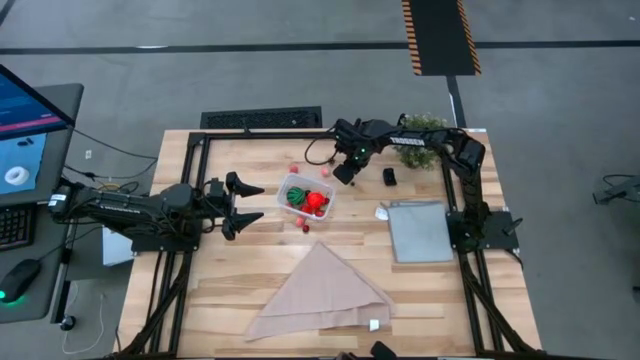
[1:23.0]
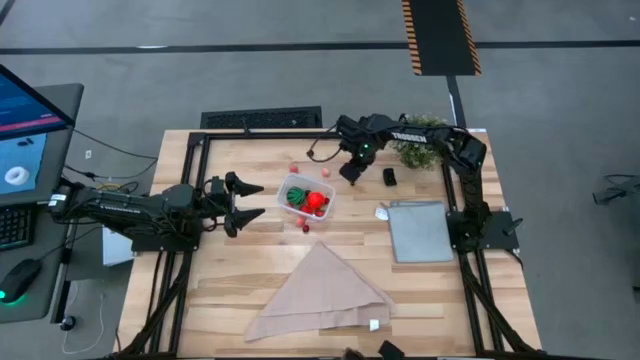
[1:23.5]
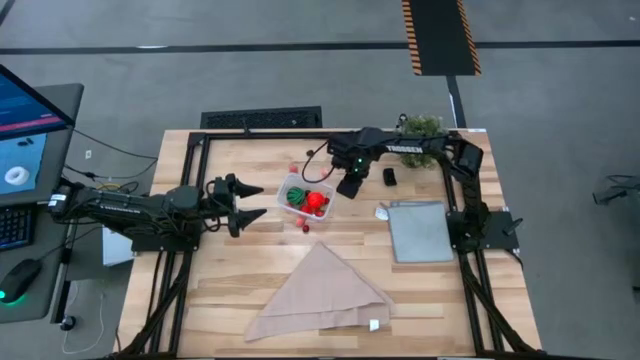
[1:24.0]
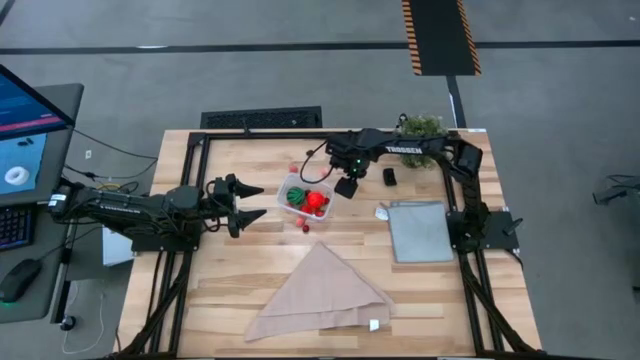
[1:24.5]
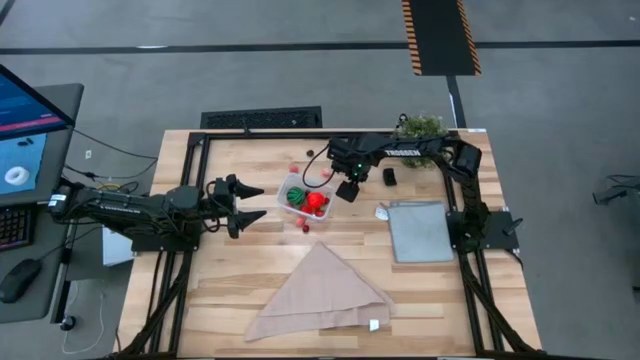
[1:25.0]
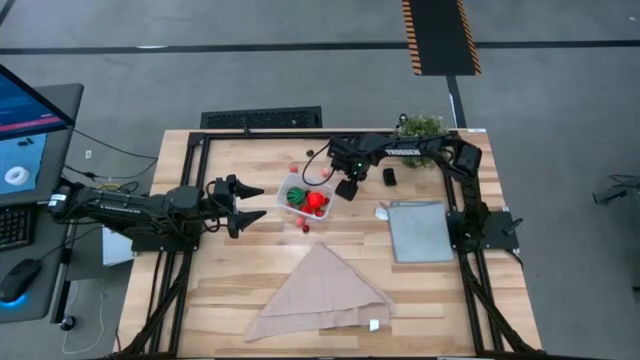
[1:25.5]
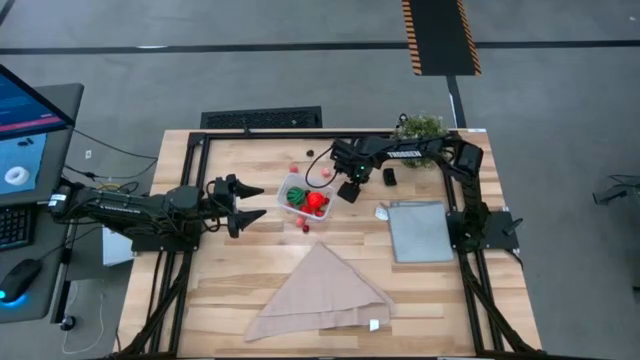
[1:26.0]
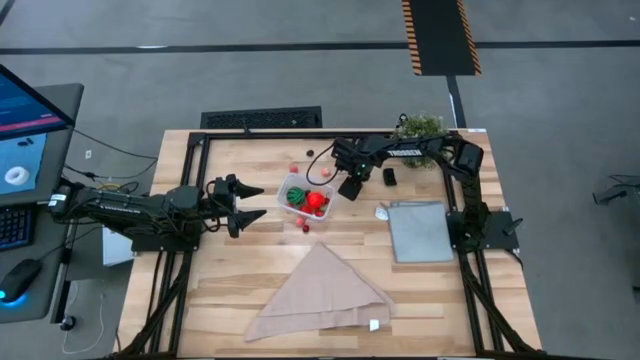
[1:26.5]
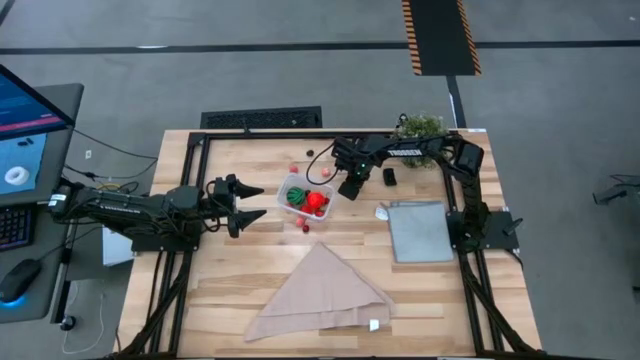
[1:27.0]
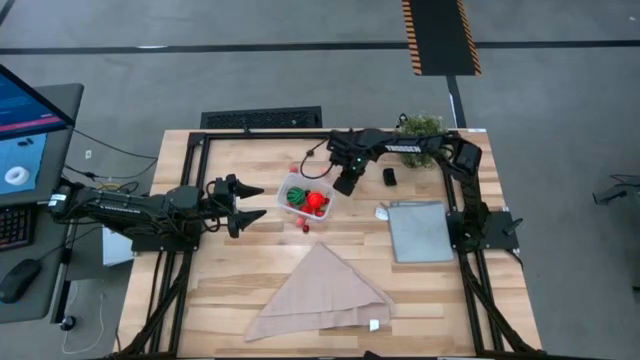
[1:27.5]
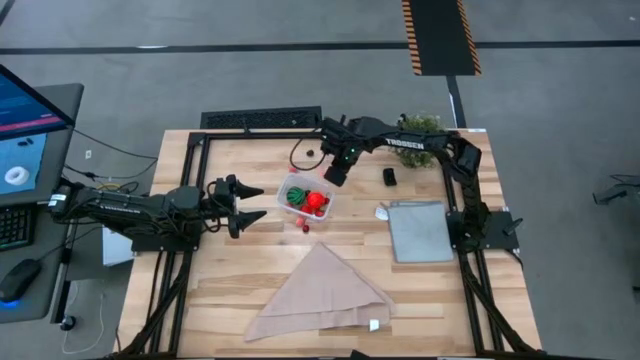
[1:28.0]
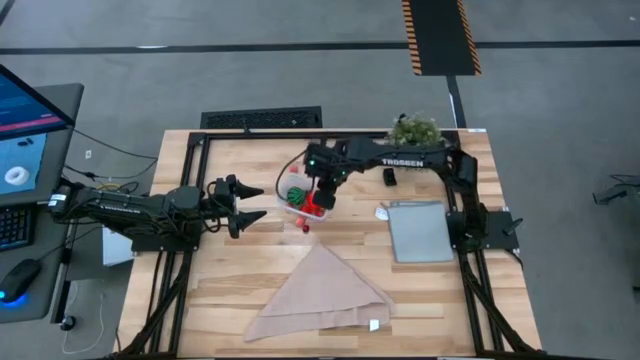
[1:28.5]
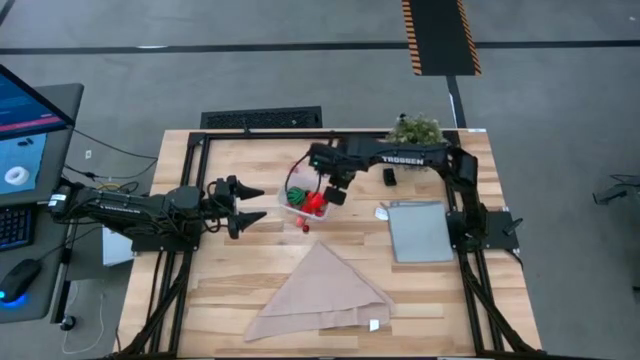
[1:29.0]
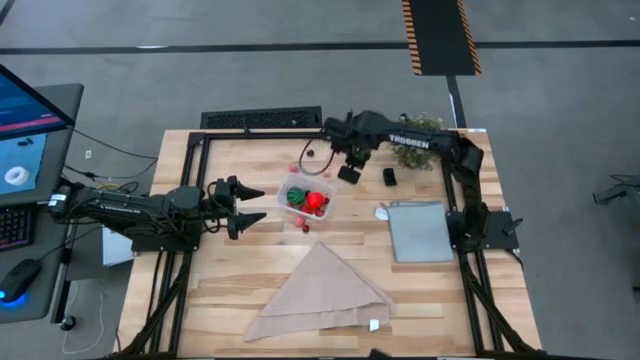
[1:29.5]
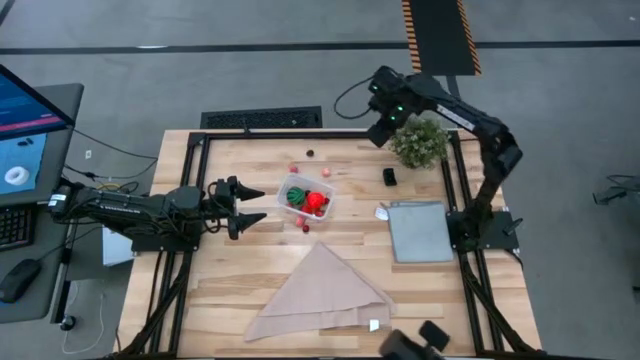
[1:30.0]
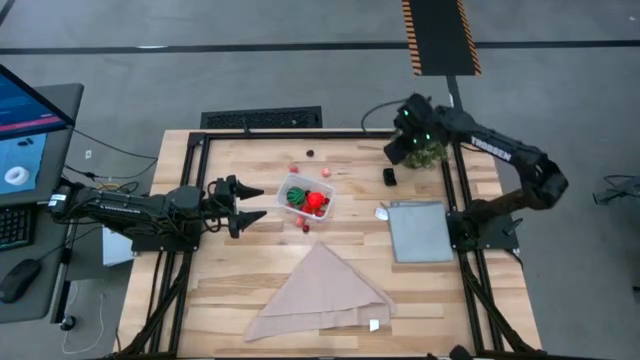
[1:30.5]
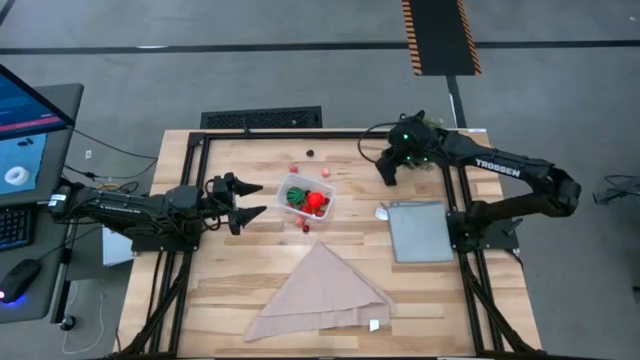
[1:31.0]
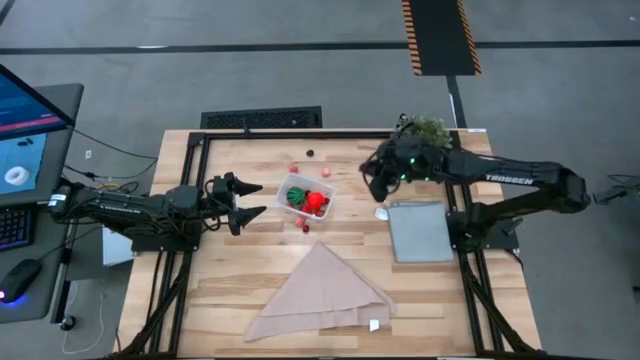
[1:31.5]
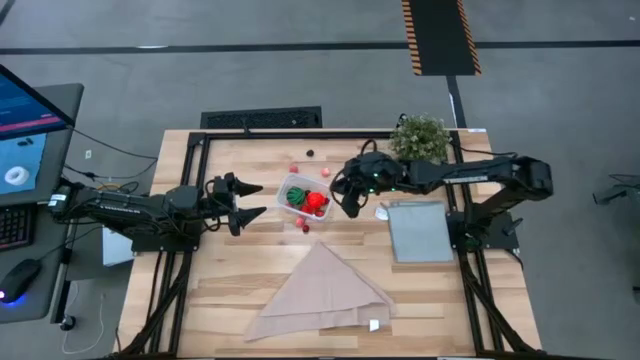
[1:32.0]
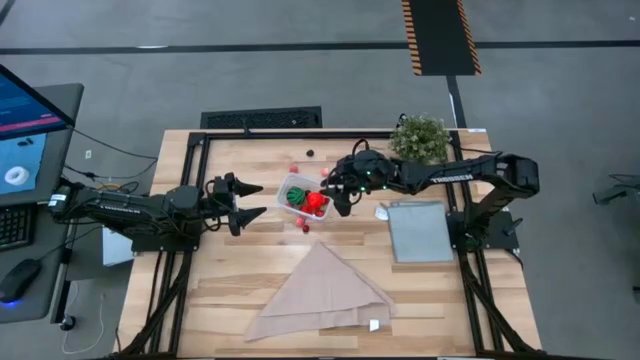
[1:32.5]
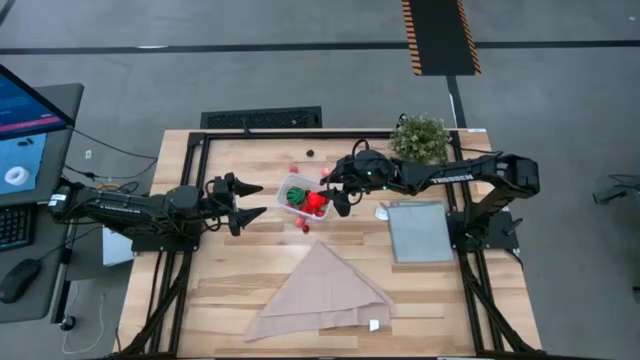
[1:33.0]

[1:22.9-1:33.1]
Task: Pick and placing Produce into tupperware
Put the blueberry into the transparent bin

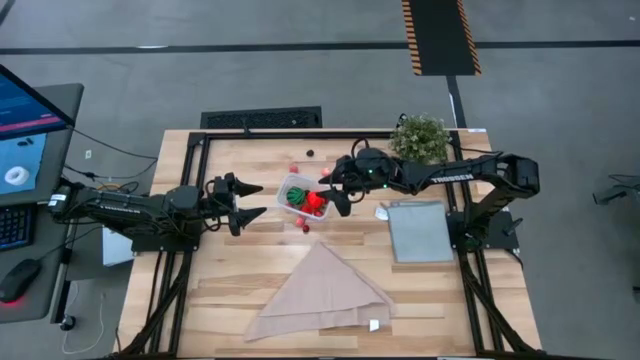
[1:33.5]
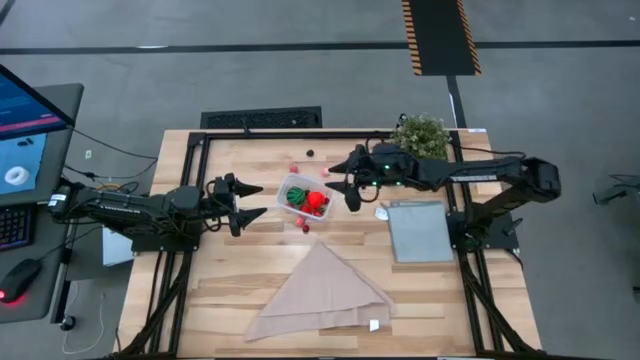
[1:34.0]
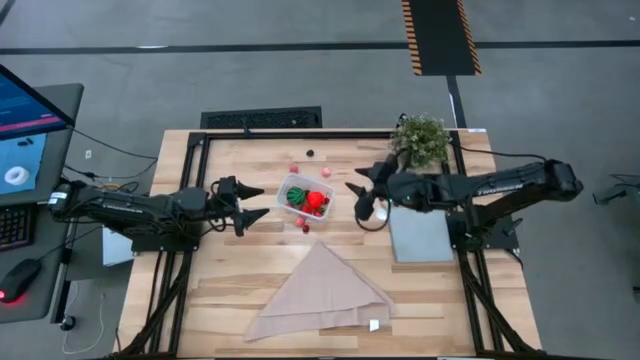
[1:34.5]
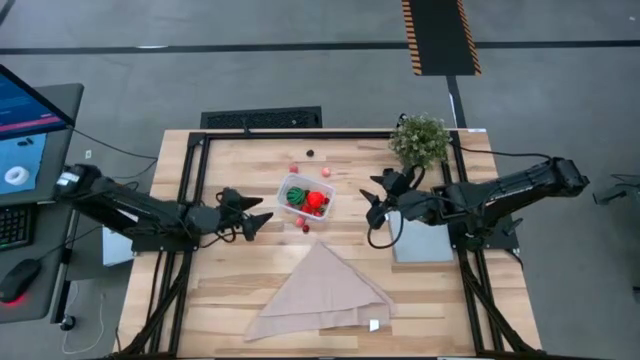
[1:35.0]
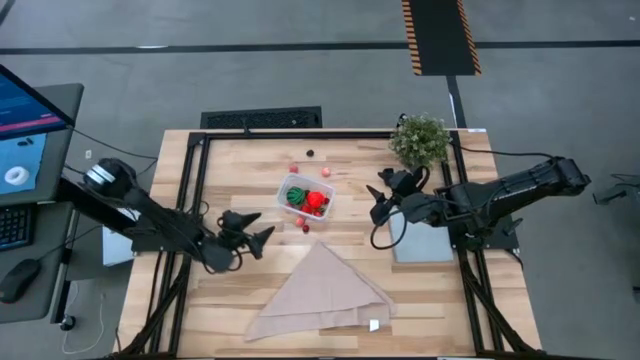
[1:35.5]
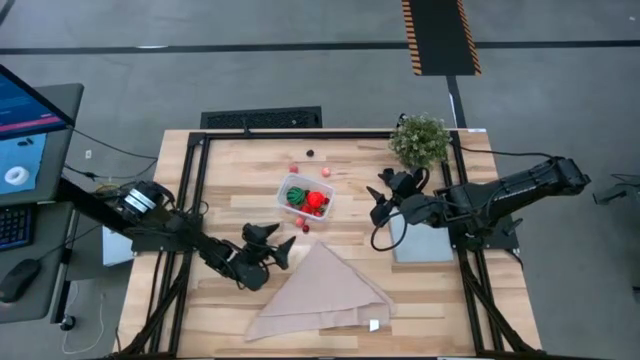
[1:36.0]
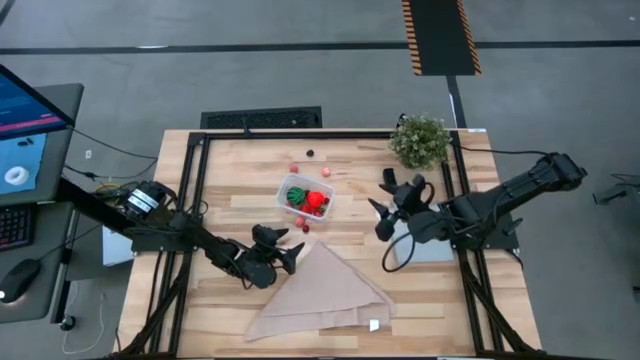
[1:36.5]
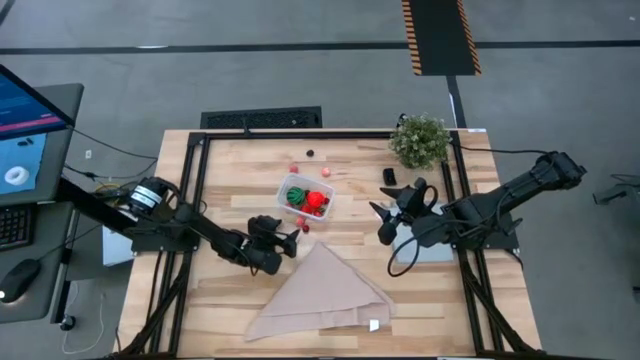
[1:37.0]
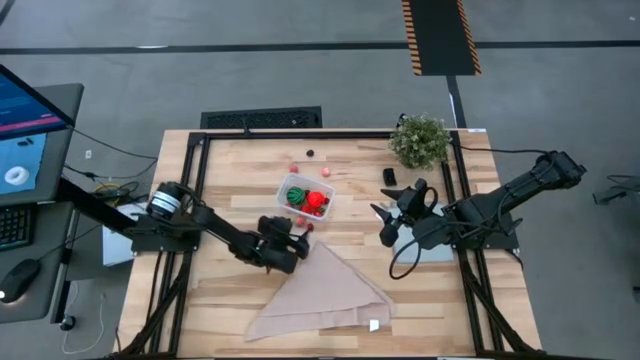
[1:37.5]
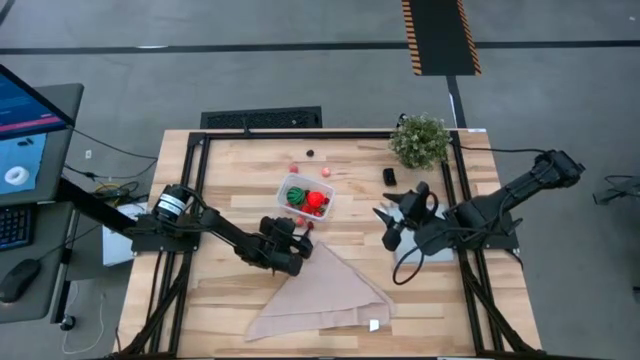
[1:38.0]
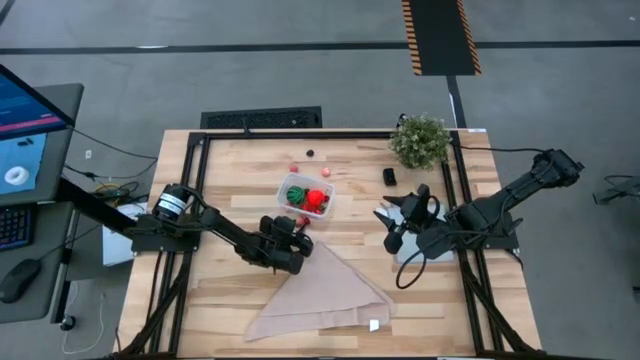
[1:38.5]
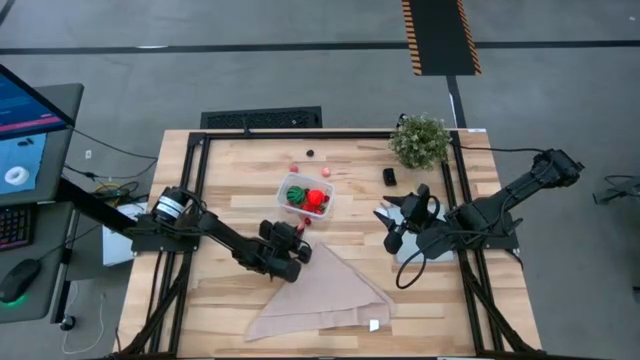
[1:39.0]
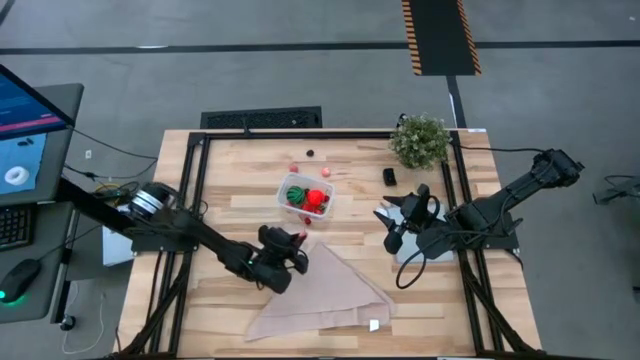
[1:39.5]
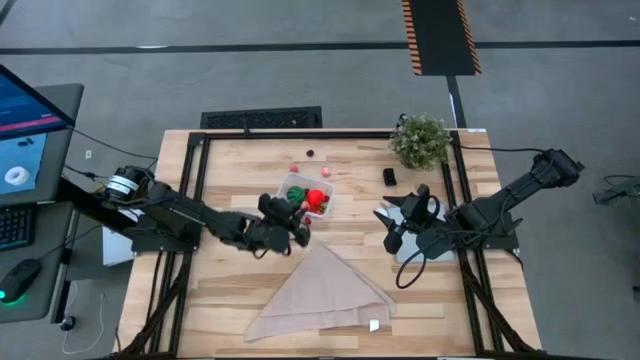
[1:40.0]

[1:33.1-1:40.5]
Put the bottom peach into the transparent bin

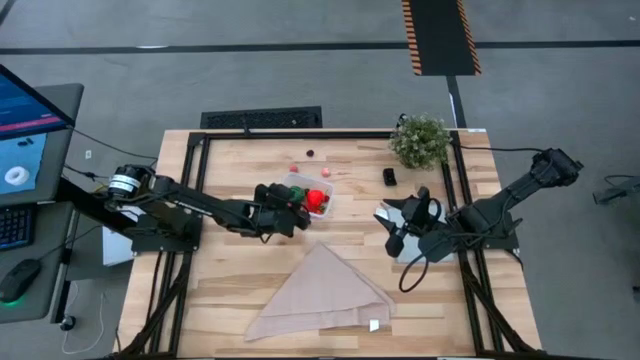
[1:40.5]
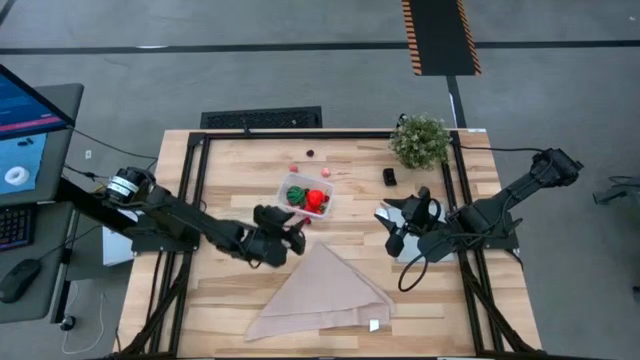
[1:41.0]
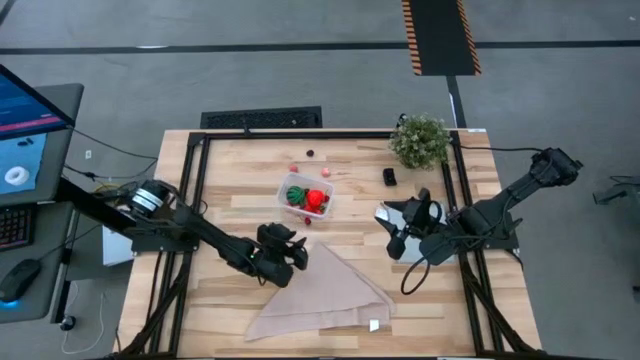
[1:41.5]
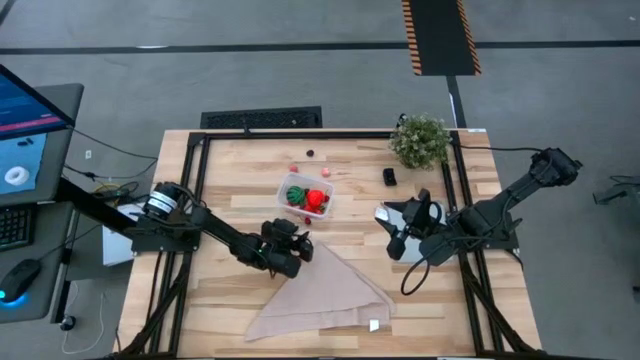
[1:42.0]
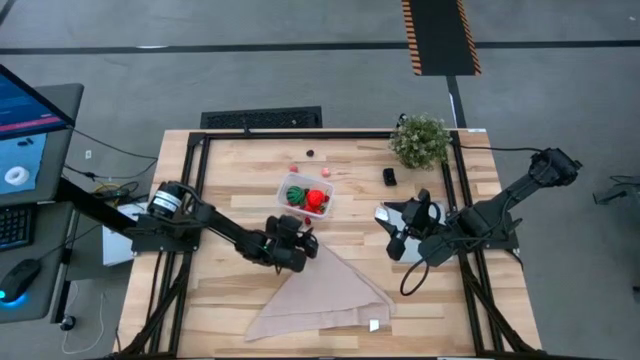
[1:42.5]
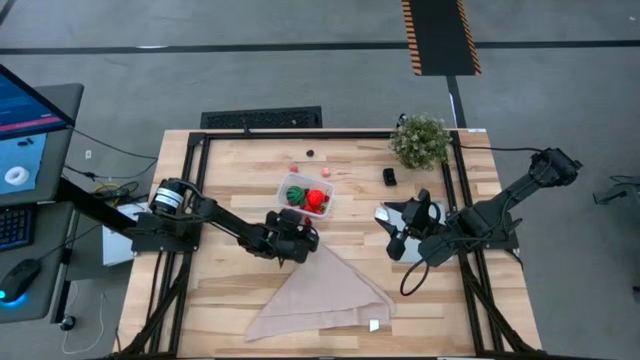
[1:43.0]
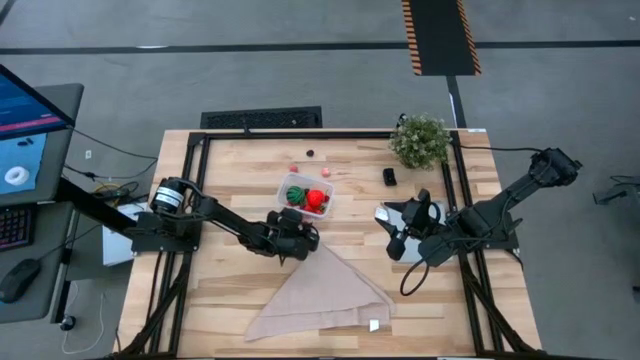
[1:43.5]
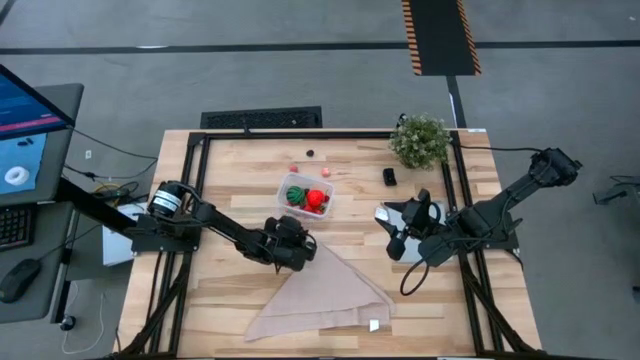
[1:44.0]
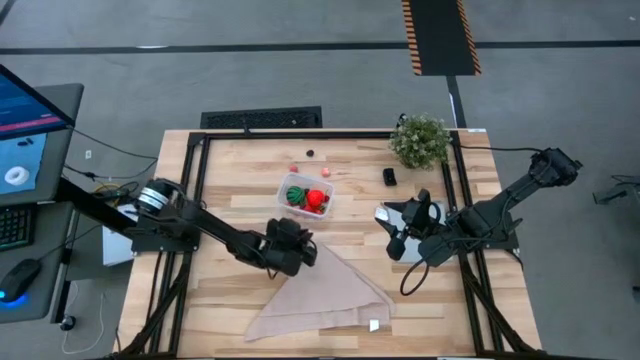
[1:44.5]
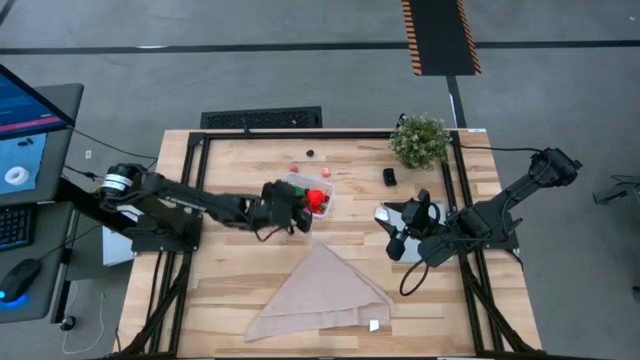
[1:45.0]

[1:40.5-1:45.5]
Put the red cherry into the transparent bin
